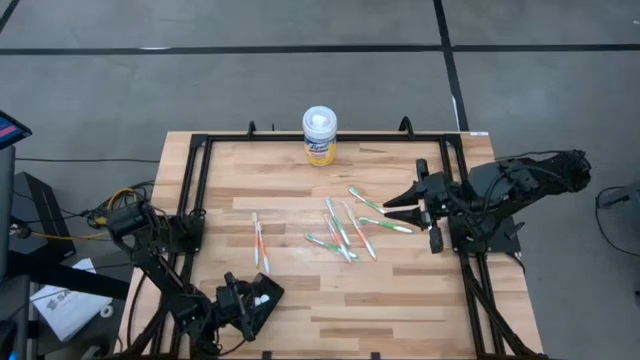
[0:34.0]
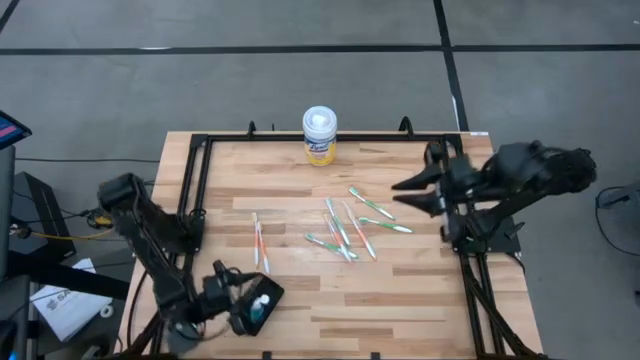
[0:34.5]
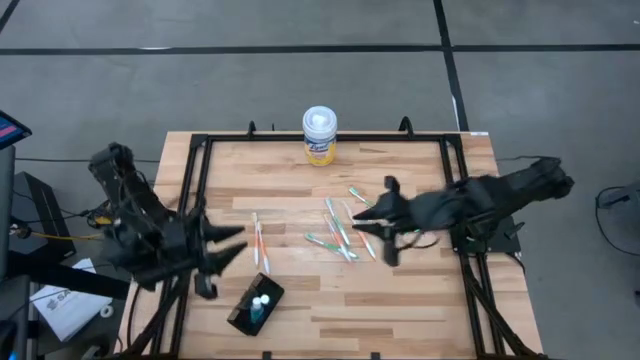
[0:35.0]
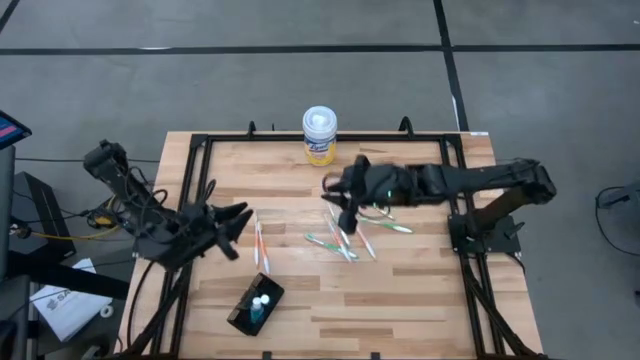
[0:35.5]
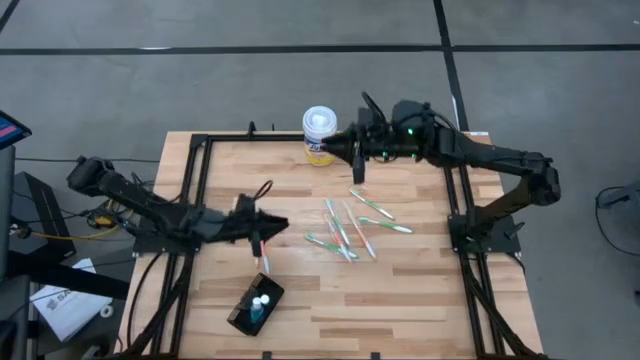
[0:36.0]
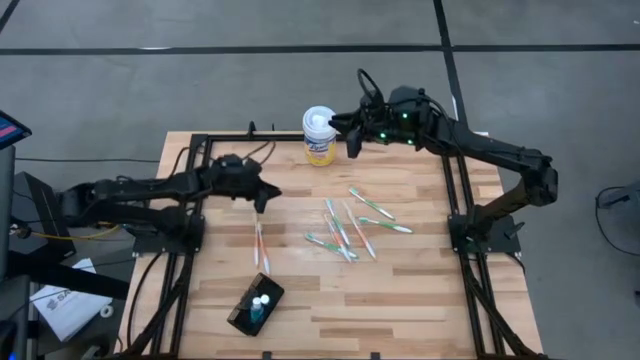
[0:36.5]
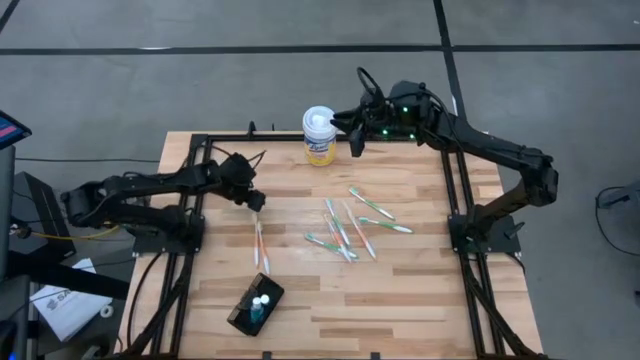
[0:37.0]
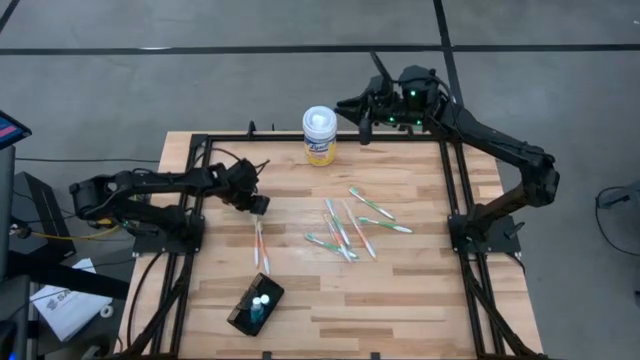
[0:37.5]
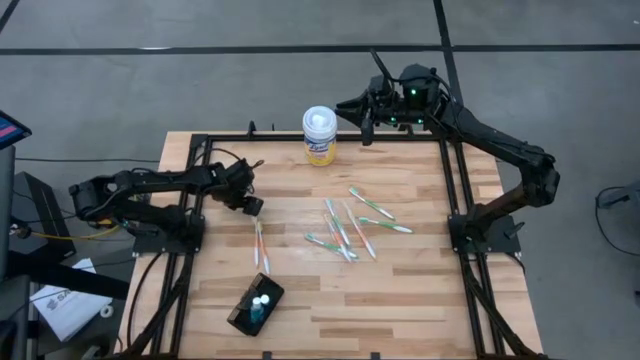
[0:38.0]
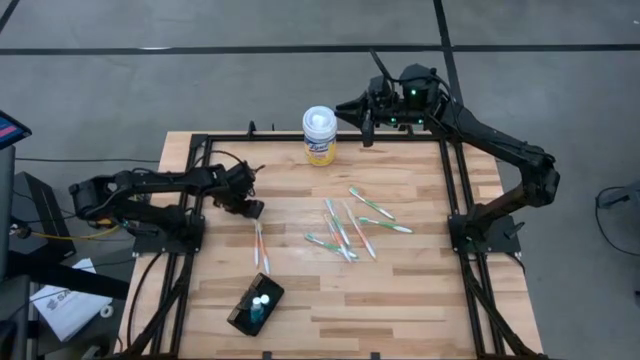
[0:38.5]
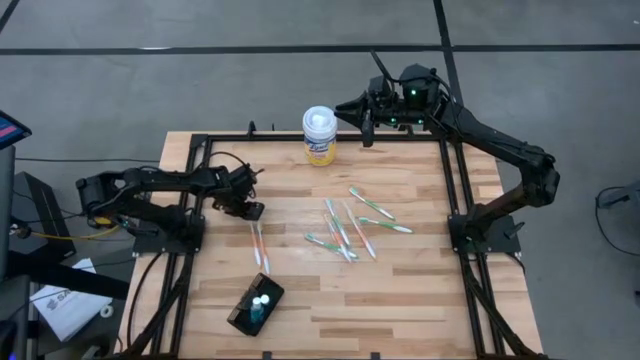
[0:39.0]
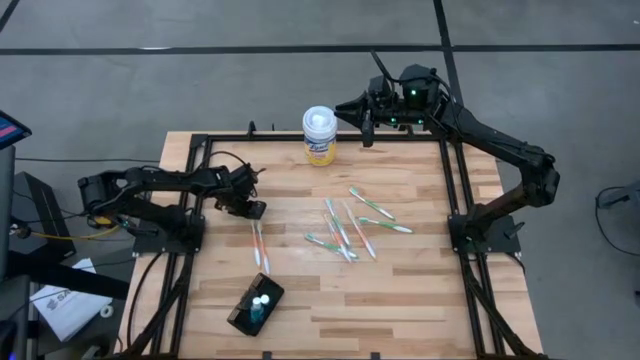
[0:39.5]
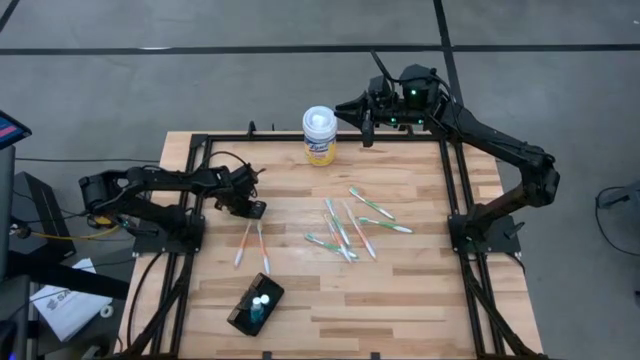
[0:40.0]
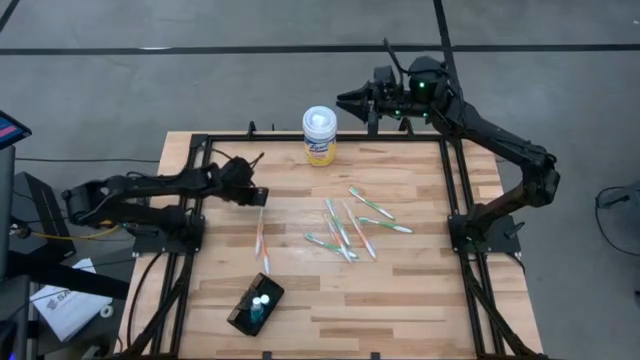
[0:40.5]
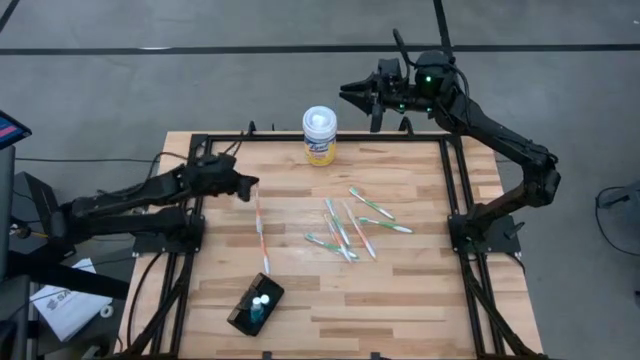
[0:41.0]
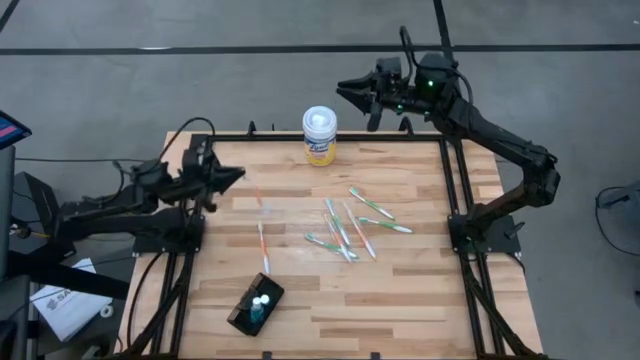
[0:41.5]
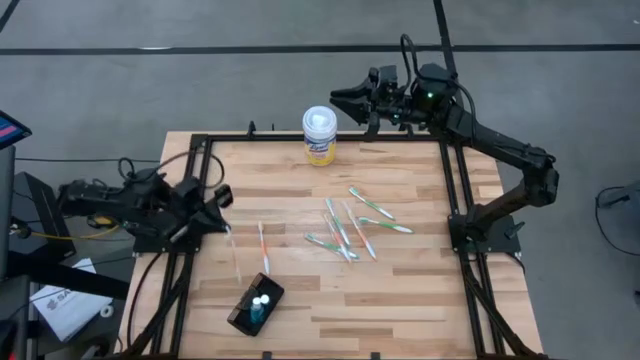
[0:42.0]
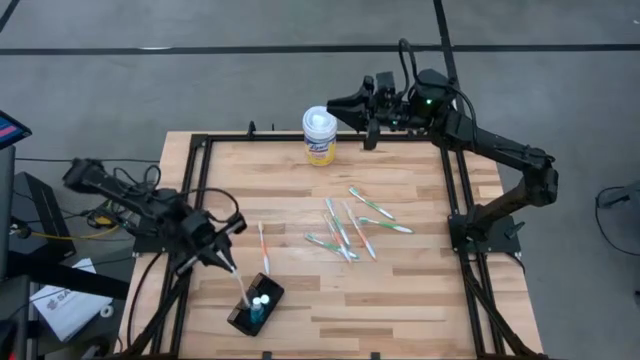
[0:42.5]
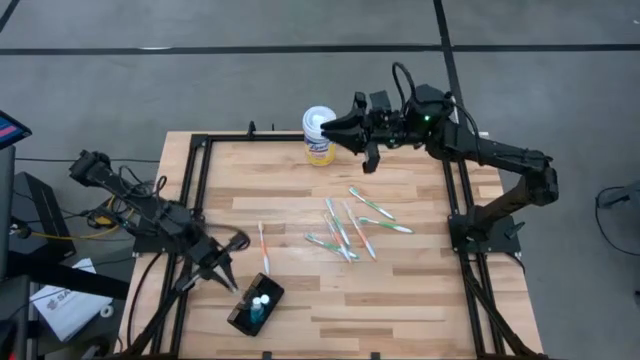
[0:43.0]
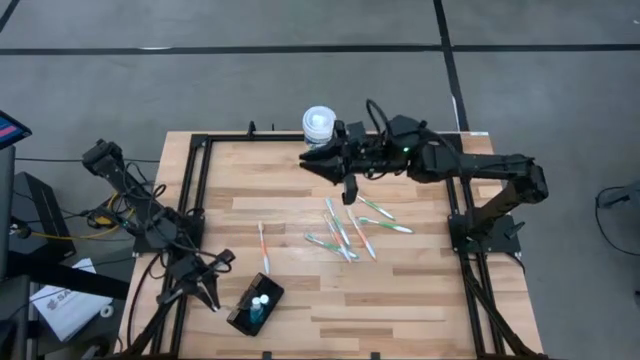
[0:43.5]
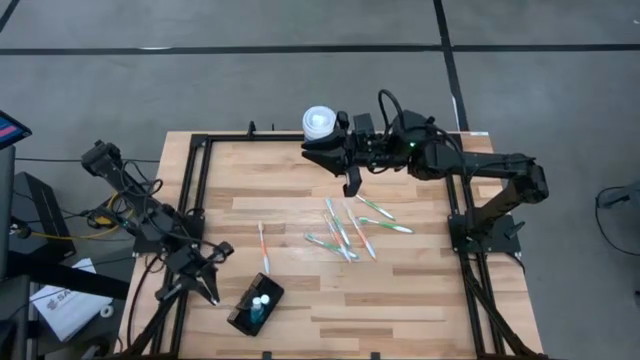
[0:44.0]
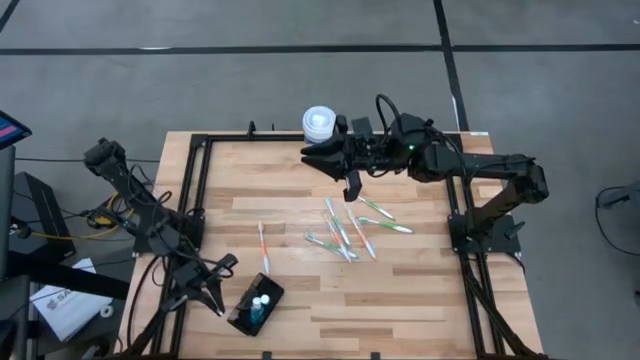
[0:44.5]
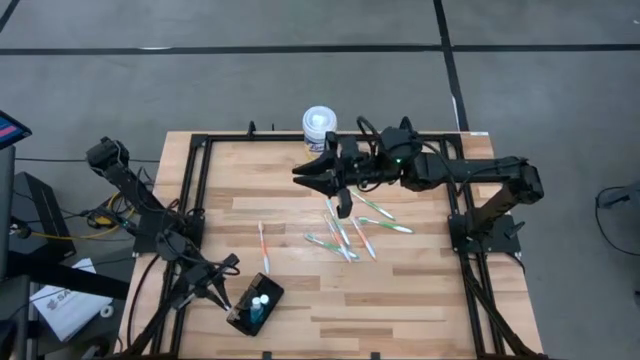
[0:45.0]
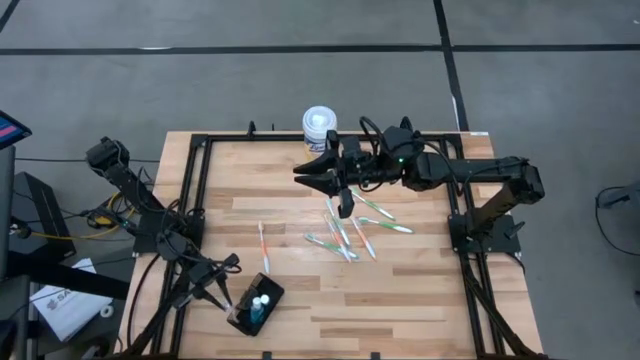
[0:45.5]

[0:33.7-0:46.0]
Task: Pick & Place toothbrushing station
Put the orange toothbrush into the black wire organizer bin

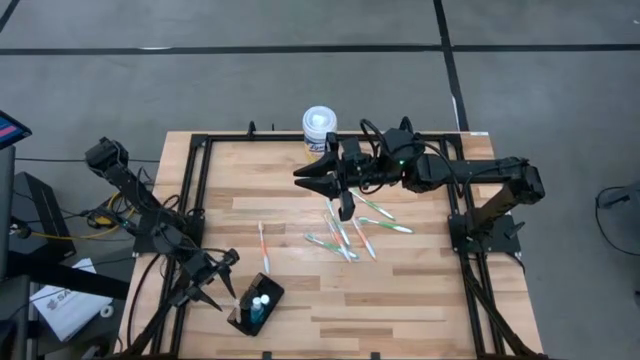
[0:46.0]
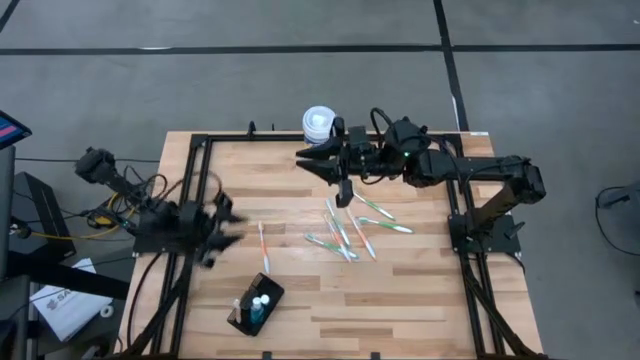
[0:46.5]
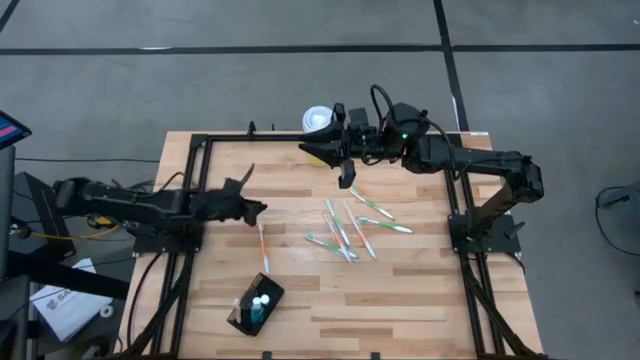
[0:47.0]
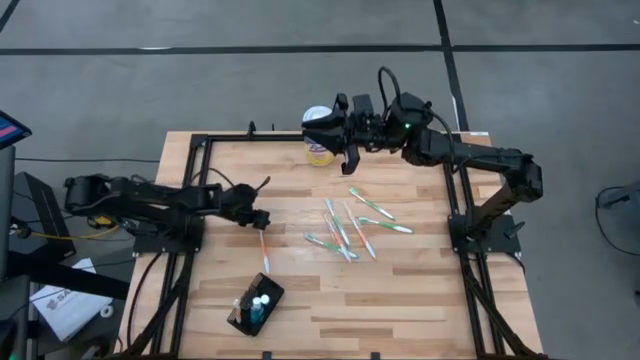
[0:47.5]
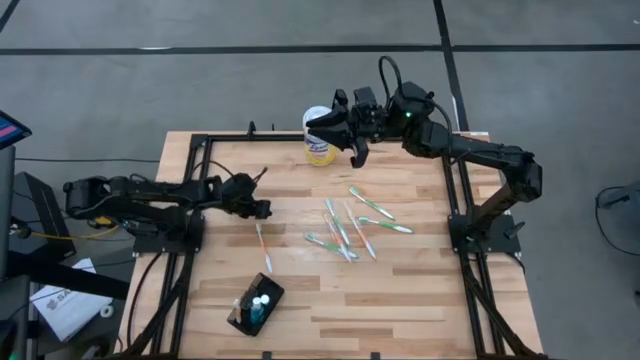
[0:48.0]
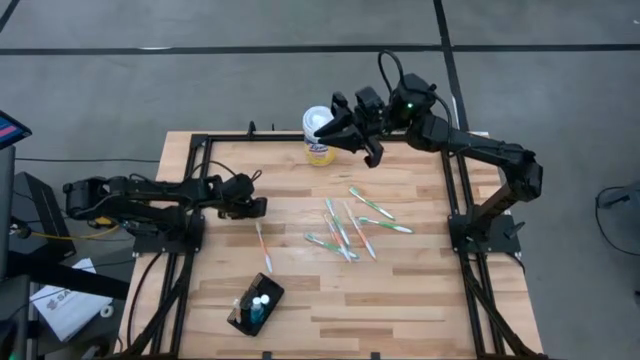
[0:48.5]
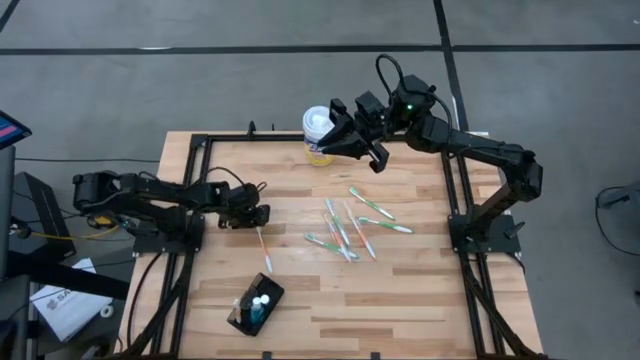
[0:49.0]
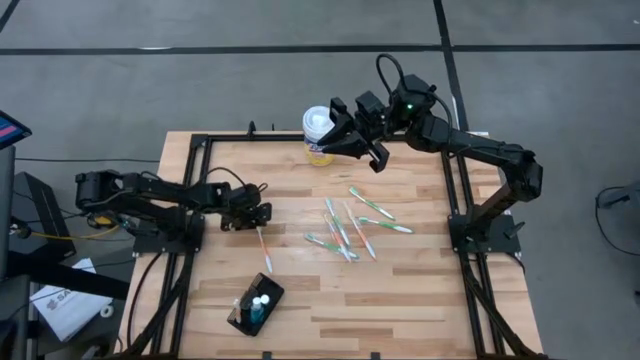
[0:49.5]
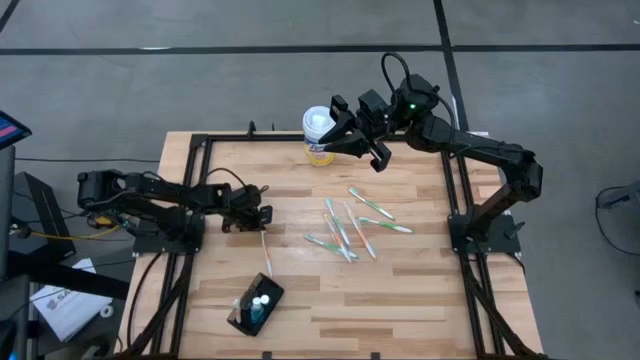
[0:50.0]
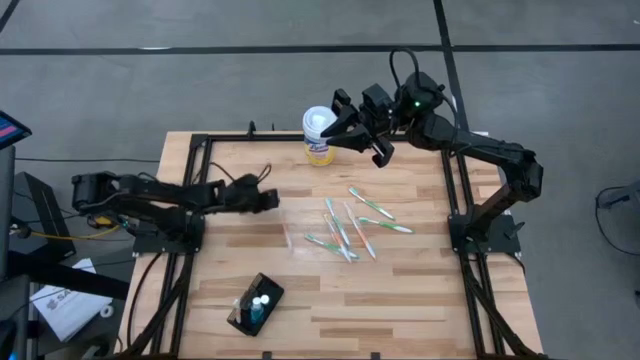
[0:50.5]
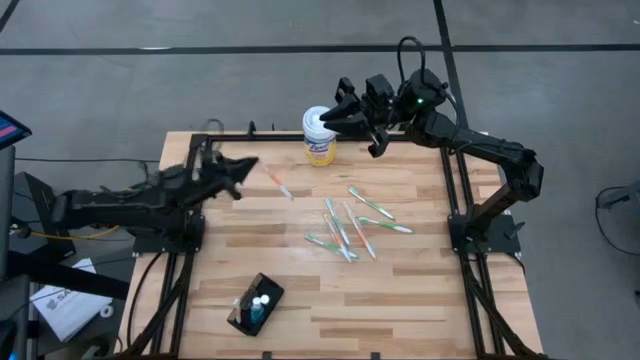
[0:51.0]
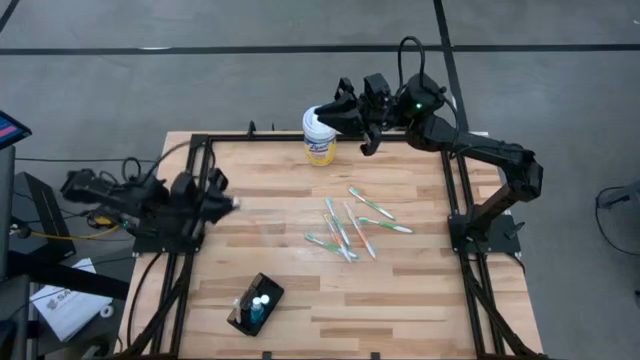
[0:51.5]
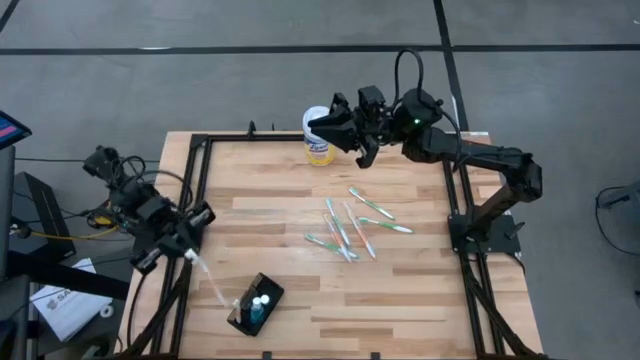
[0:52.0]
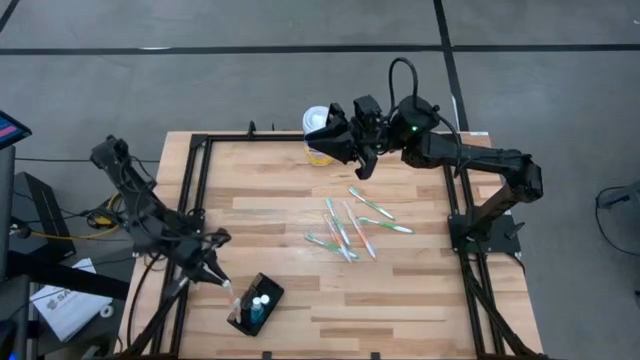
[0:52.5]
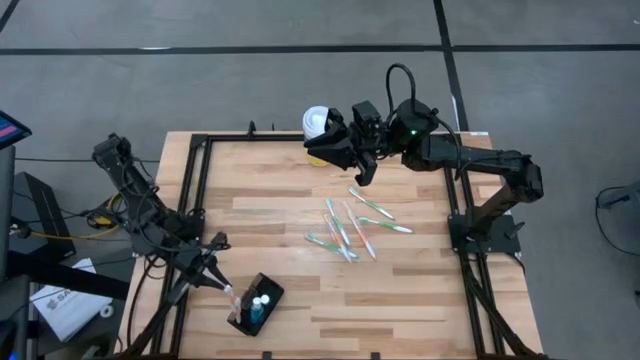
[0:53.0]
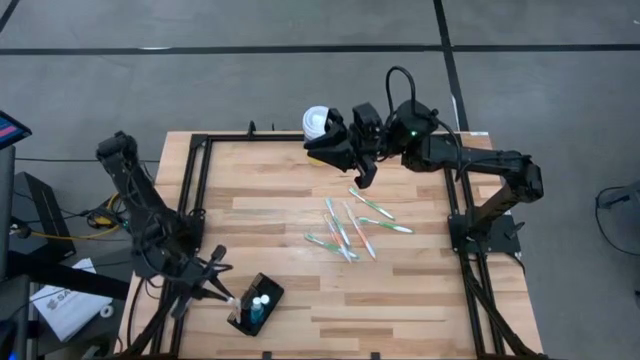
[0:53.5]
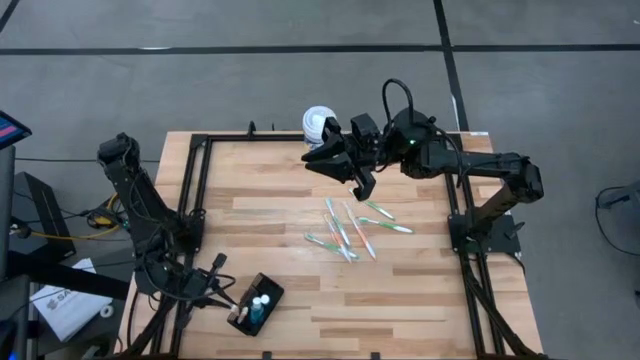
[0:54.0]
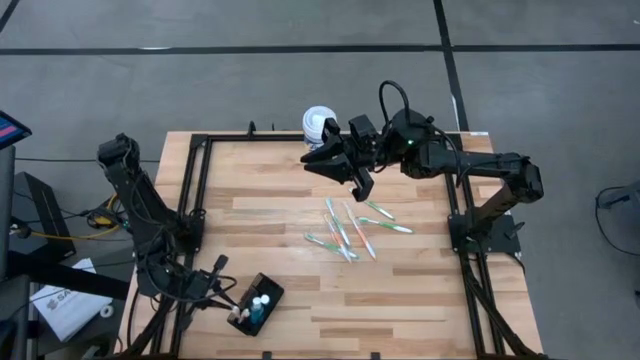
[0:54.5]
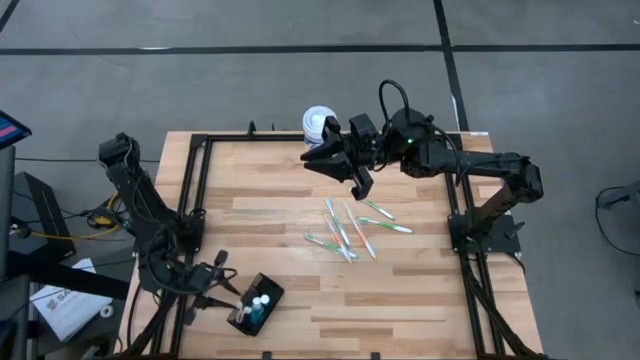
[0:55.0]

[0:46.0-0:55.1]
Put the orange toothbrush into the black wire organizer bin
